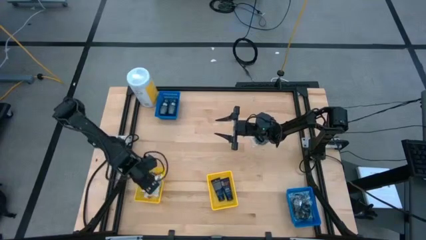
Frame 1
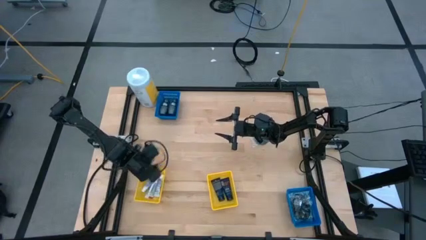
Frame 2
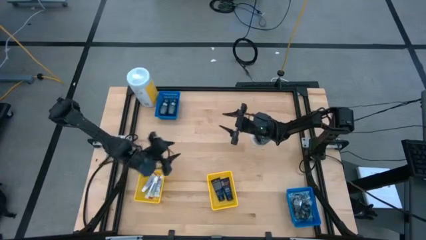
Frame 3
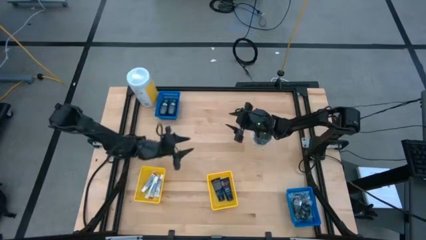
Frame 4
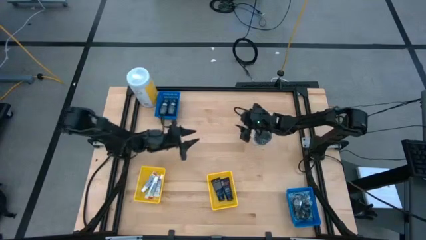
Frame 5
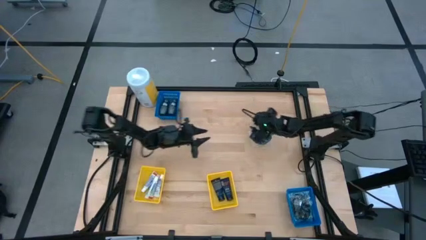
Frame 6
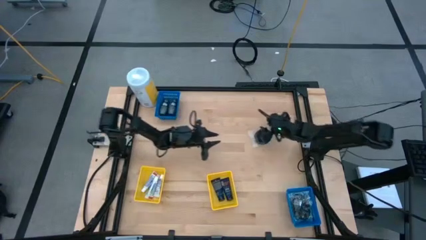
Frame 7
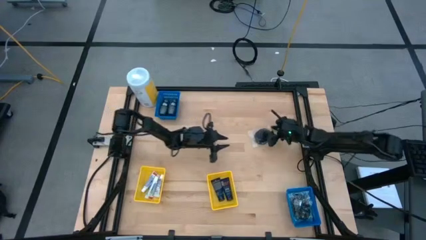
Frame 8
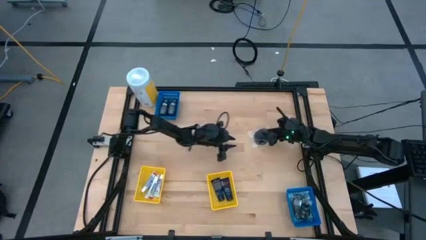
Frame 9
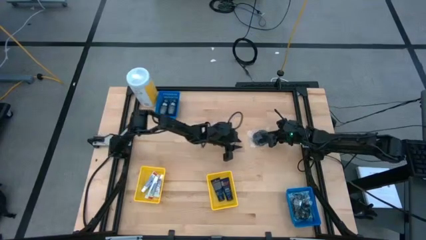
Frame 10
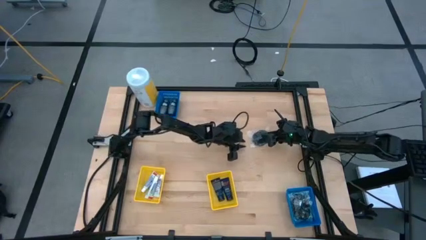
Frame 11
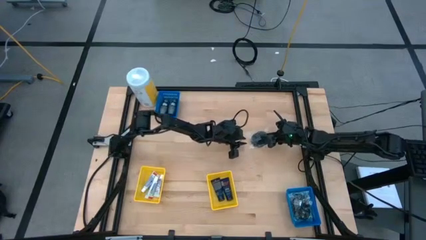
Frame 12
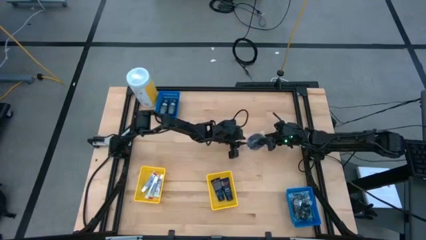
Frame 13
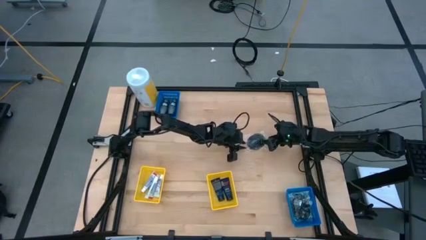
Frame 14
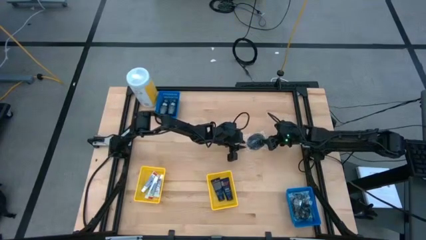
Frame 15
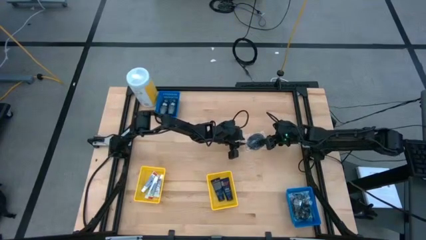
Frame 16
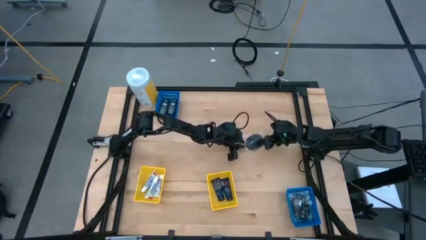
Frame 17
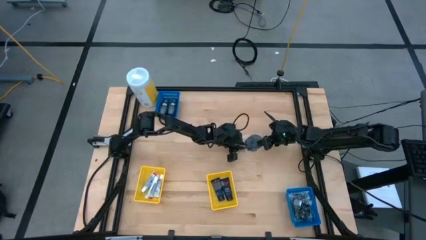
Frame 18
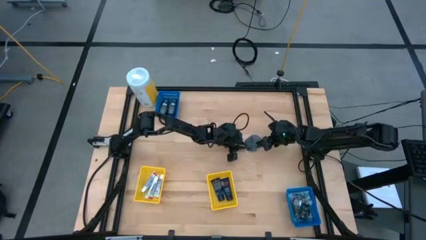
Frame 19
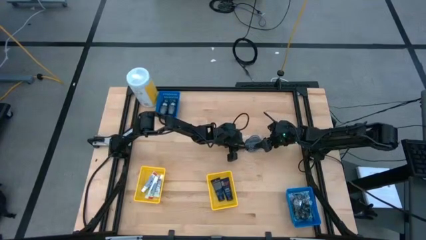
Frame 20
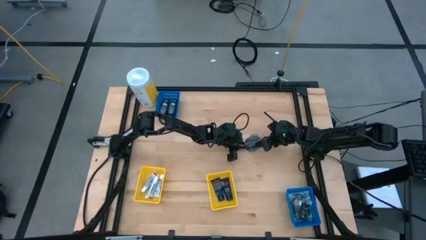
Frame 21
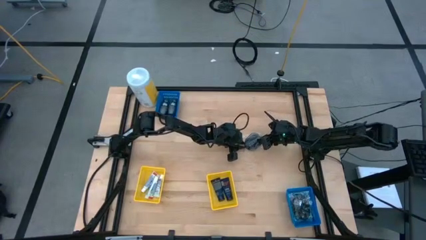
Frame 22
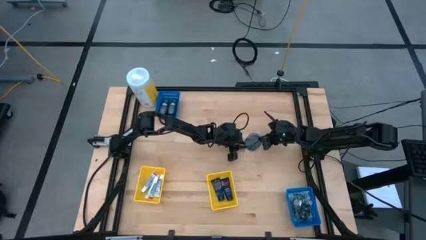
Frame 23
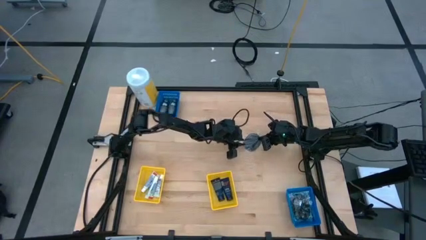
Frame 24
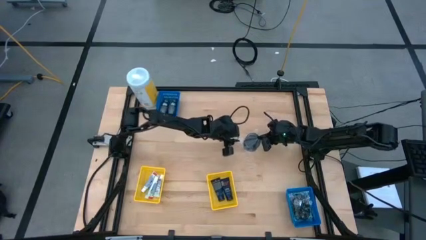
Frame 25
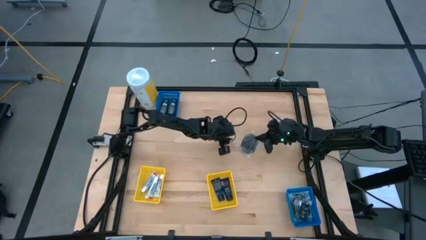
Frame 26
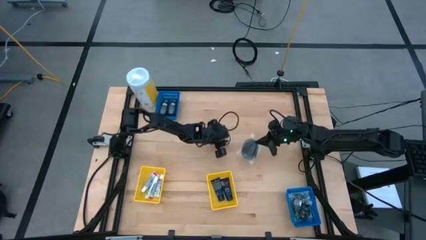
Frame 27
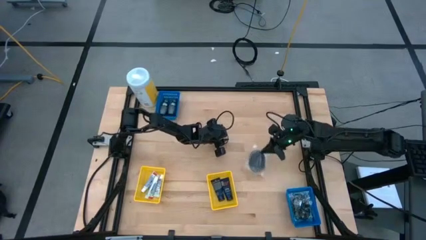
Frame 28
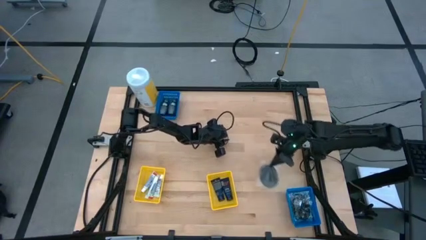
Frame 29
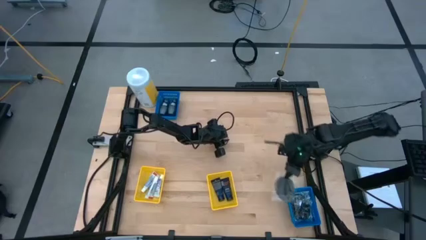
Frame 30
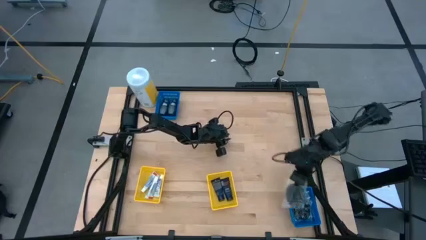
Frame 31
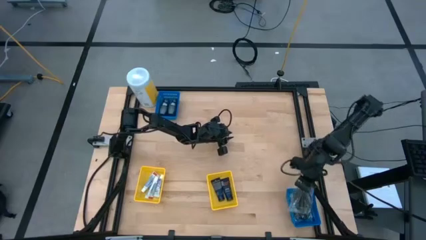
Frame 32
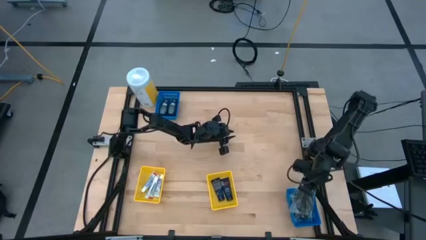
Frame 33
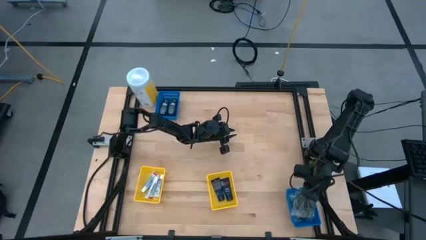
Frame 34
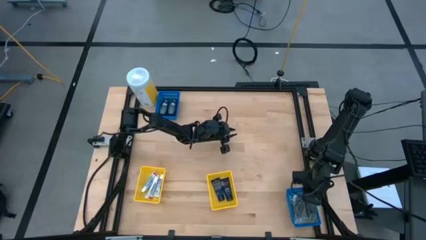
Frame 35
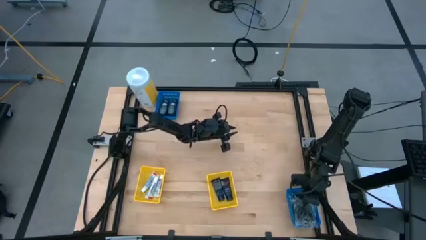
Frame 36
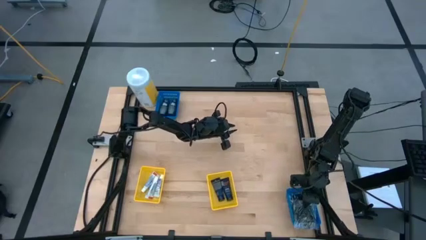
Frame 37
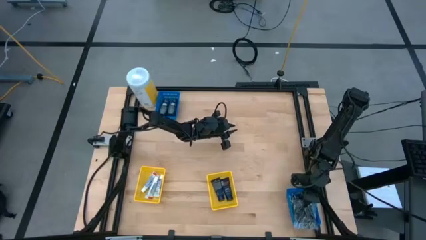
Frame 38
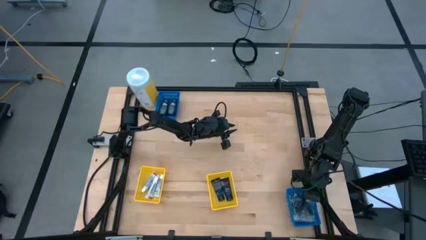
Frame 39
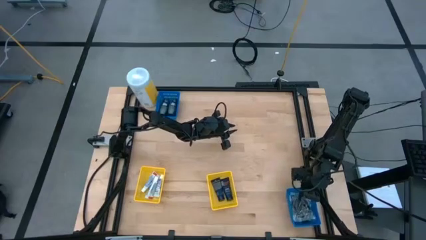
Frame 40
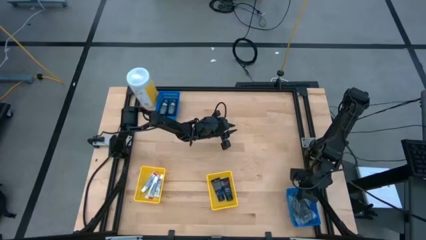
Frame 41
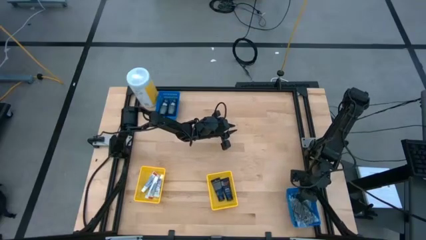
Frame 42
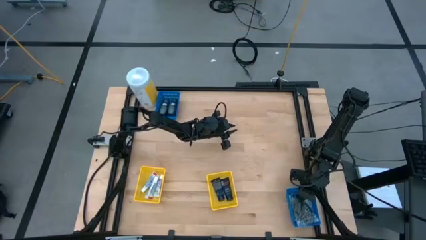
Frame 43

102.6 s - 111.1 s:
Task: Pick & Place Travel size toiletries
Put the black hairbrush into the bottom blue bin

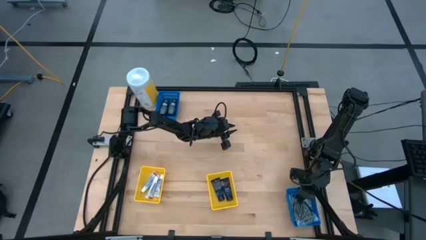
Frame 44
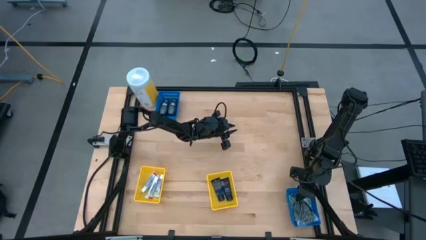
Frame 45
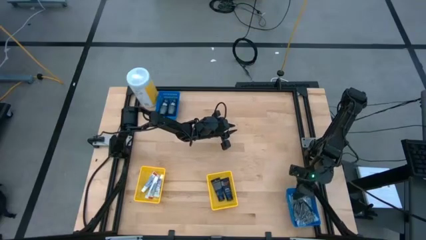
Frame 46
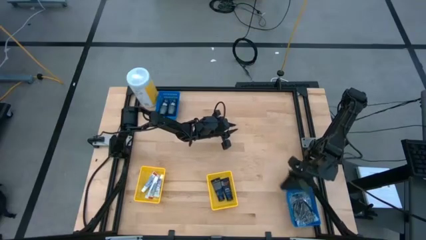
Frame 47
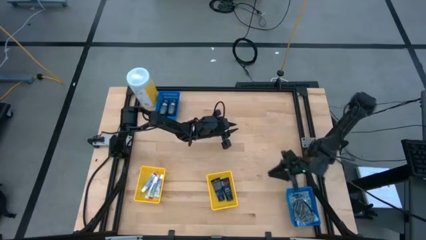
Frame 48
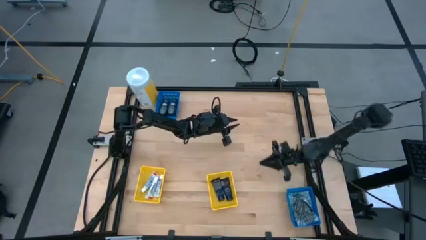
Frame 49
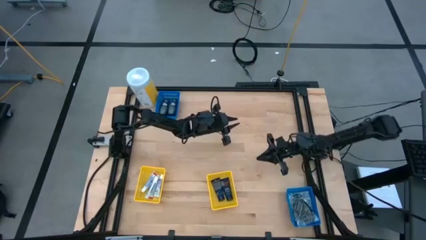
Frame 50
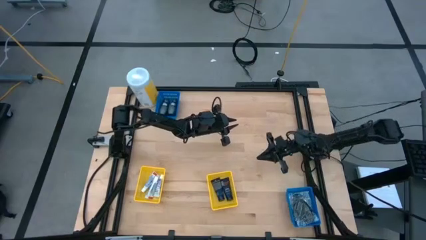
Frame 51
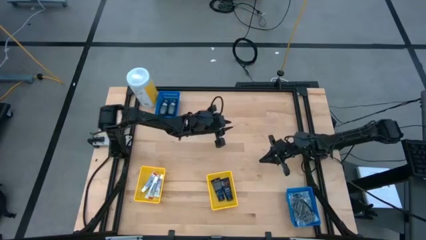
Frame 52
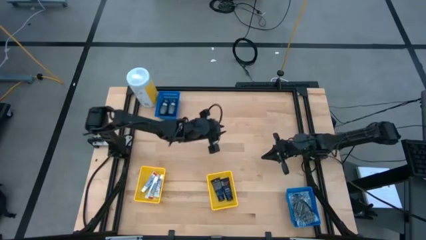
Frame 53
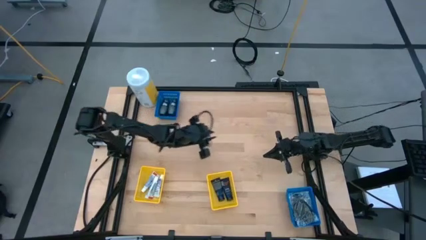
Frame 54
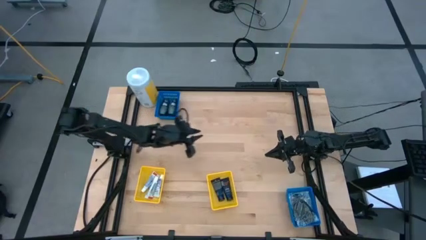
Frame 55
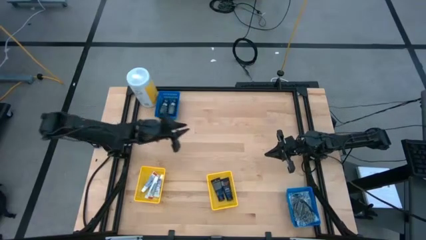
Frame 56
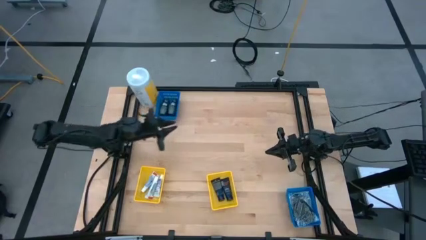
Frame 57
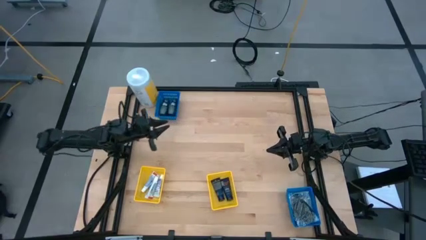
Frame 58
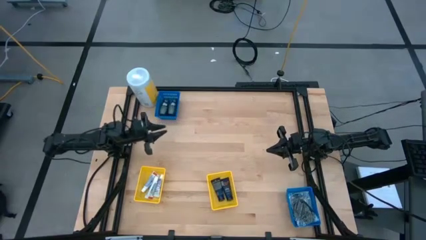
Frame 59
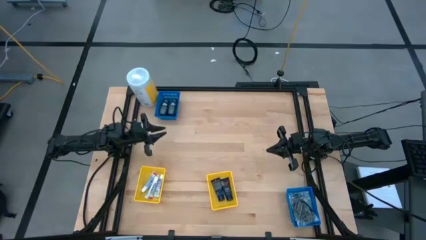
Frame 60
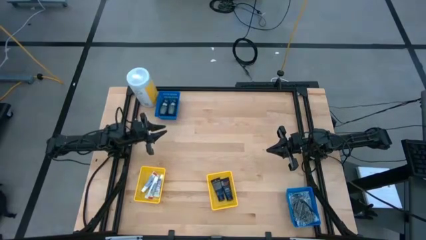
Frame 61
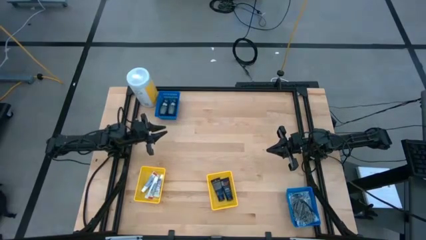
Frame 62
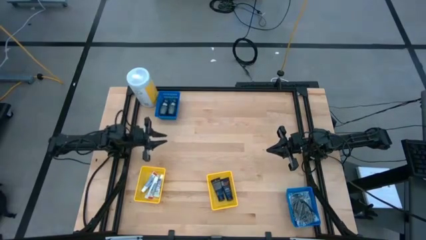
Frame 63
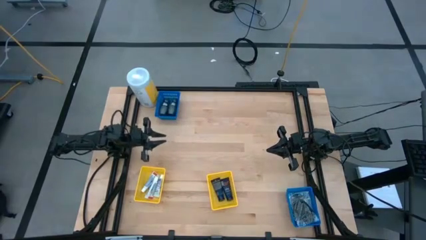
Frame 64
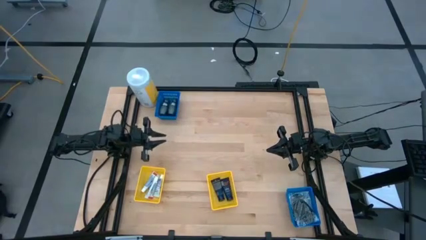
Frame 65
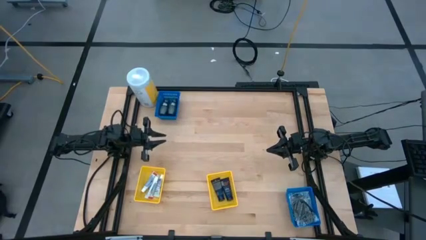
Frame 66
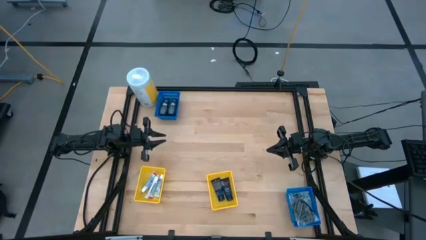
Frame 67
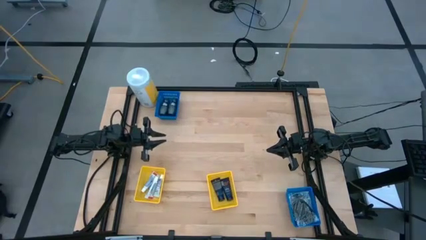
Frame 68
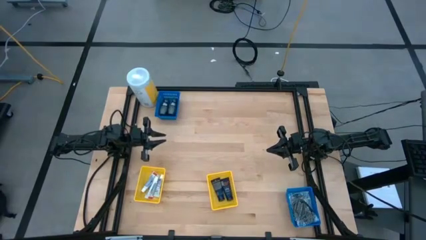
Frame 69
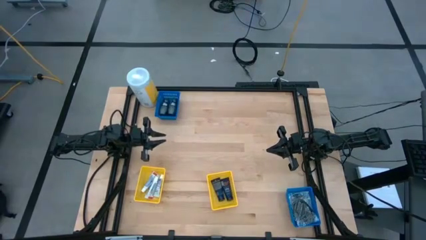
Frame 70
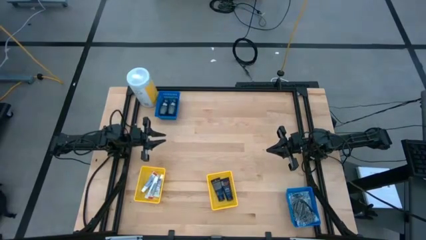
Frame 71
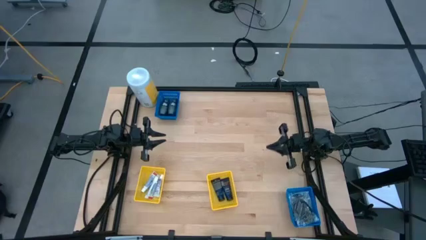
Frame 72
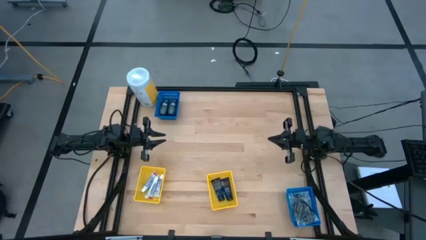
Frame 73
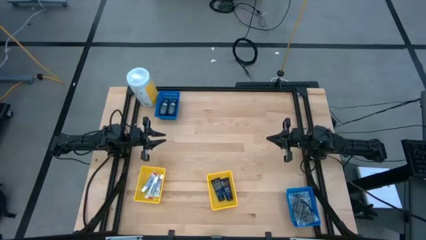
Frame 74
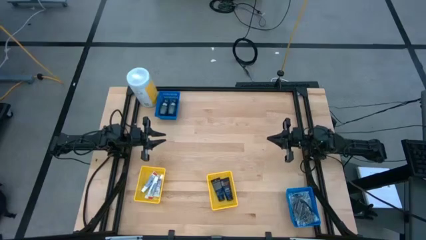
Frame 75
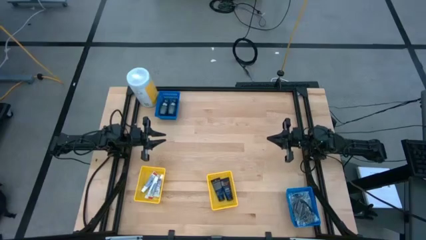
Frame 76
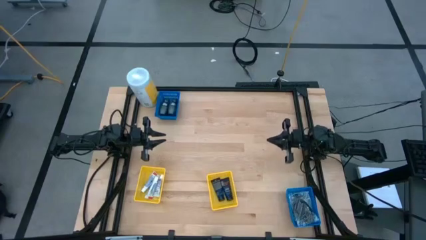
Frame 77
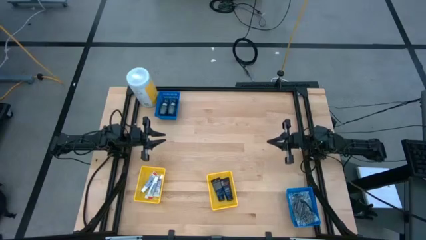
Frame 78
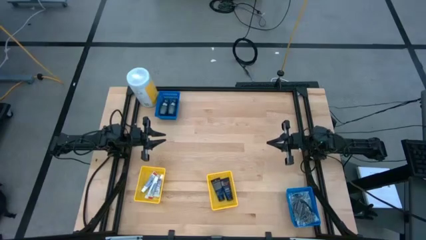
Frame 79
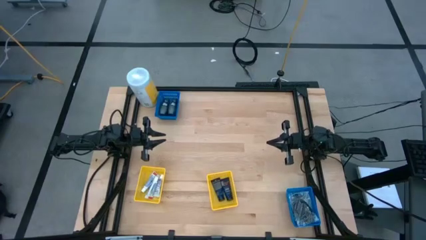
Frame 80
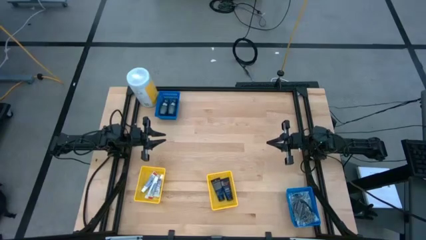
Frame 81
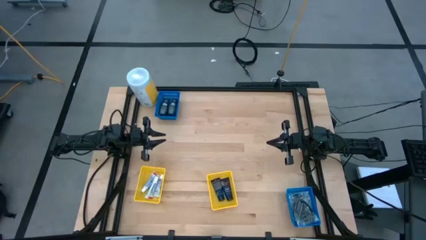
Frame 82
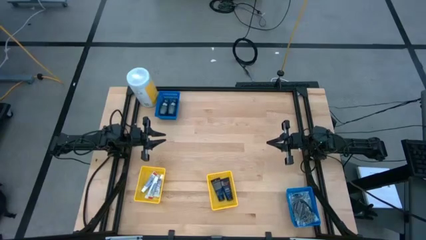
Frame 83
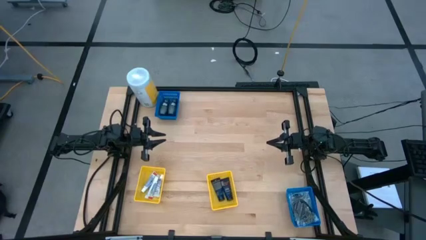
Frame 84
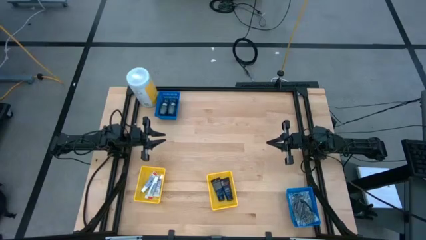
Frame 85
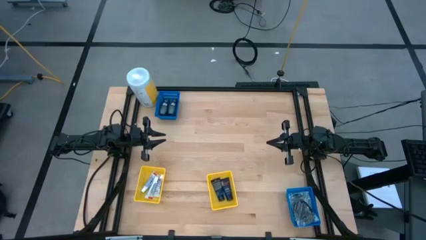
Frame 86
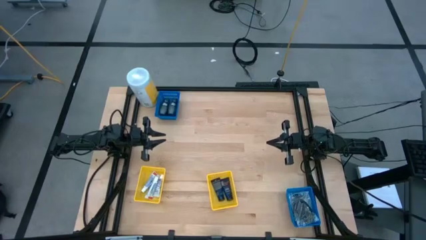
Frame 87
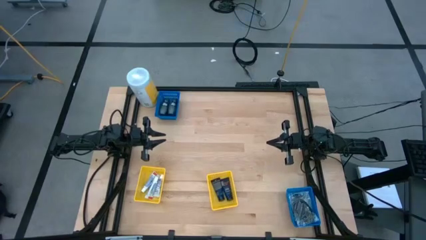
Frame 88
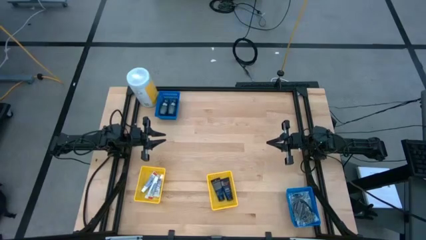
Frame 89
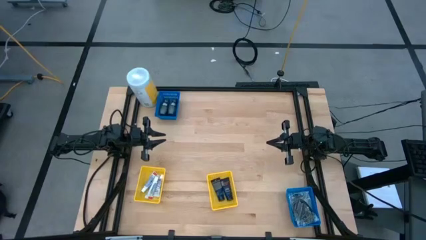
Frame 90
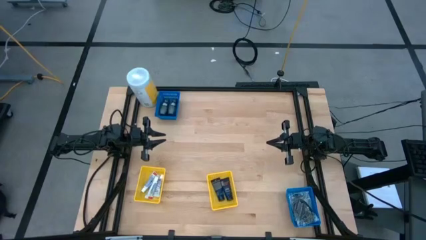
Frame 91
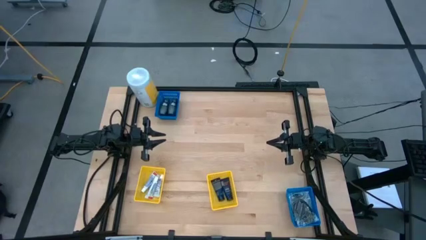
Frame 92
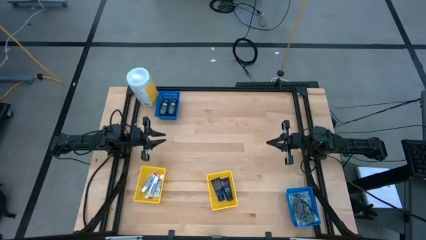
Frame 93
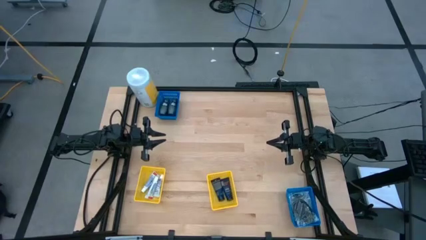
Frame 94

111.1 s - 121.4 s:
Return to Home Position
